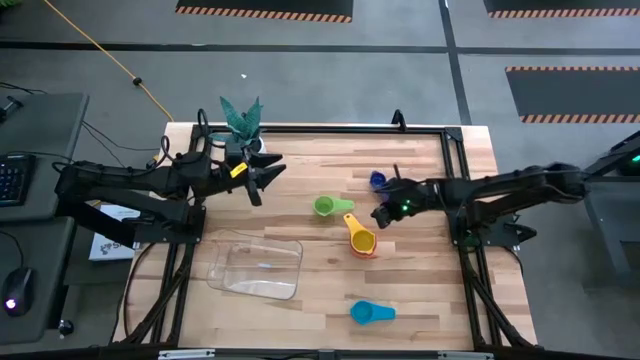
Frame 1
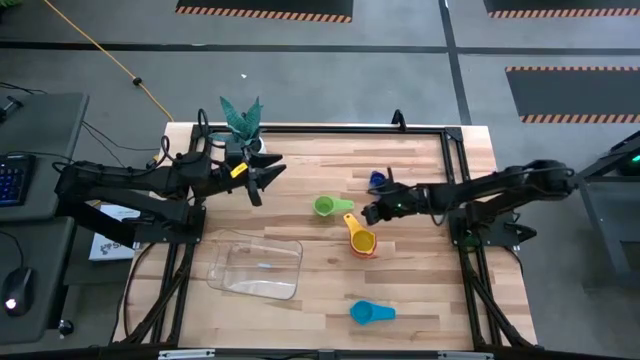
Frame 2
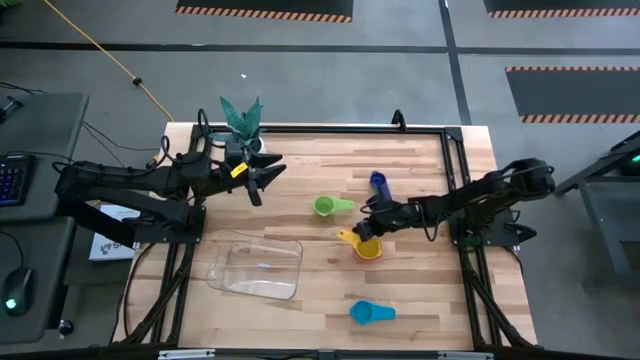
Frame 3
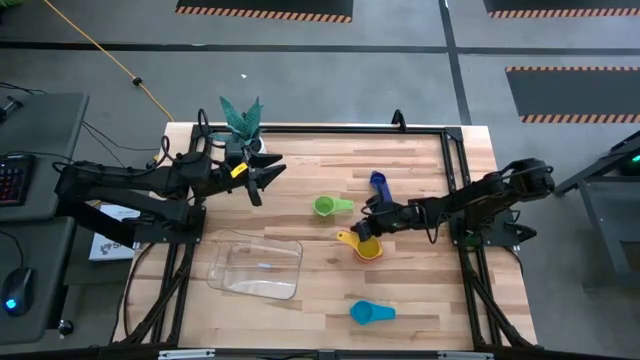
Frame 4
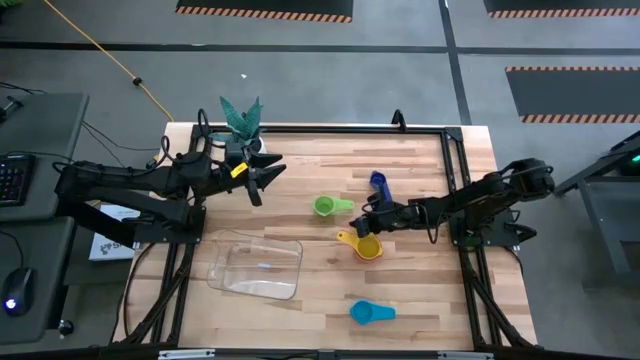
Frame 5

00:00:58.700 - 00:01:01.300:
Task: Nest measuring cups in basket
Adjust the measuring cups

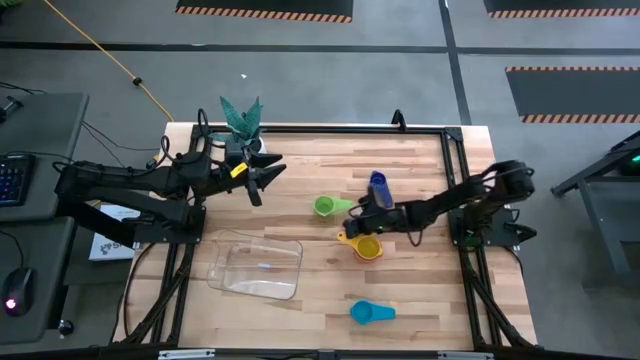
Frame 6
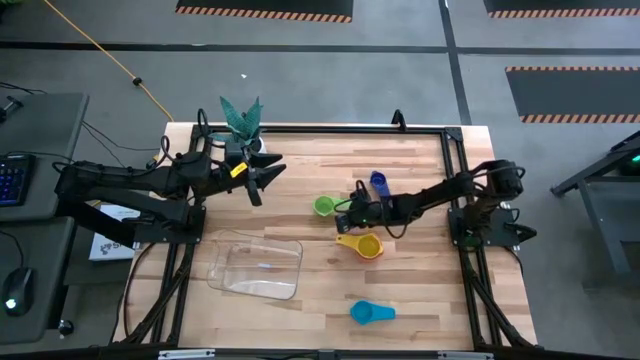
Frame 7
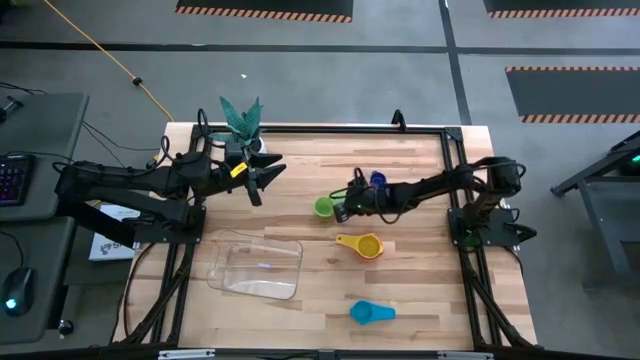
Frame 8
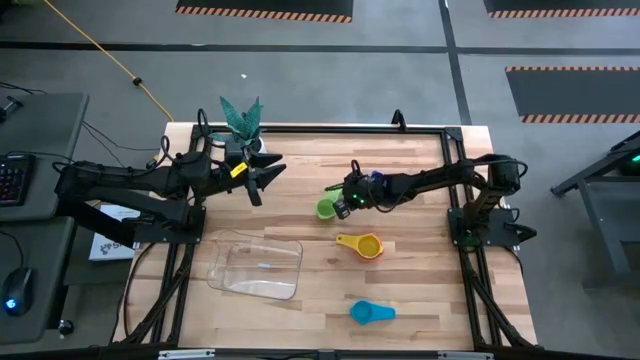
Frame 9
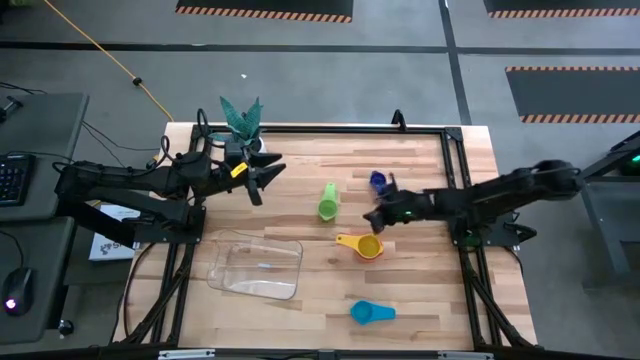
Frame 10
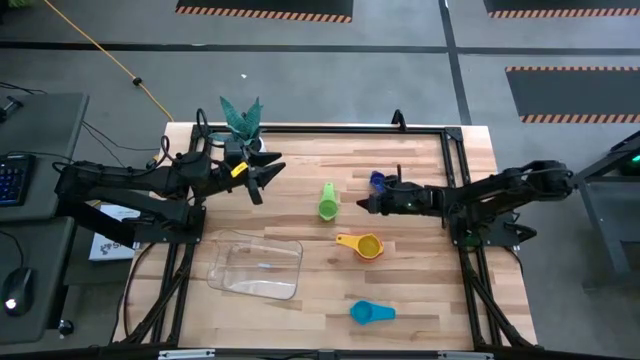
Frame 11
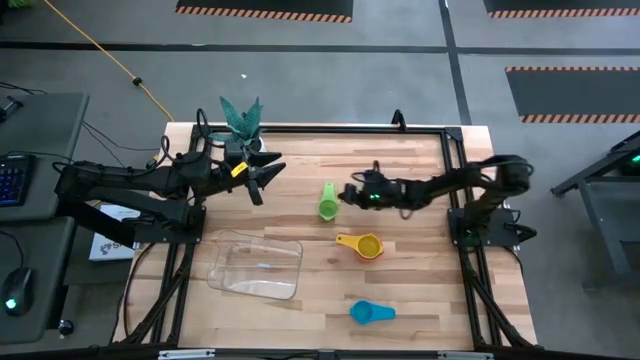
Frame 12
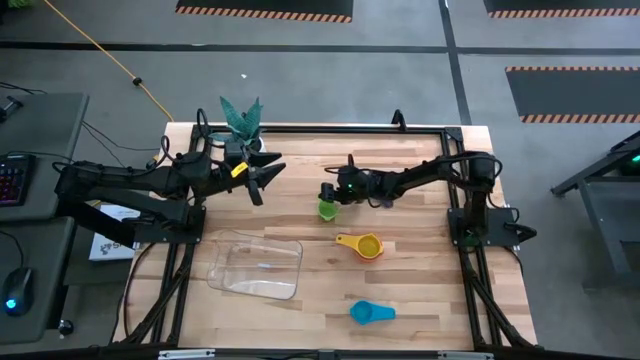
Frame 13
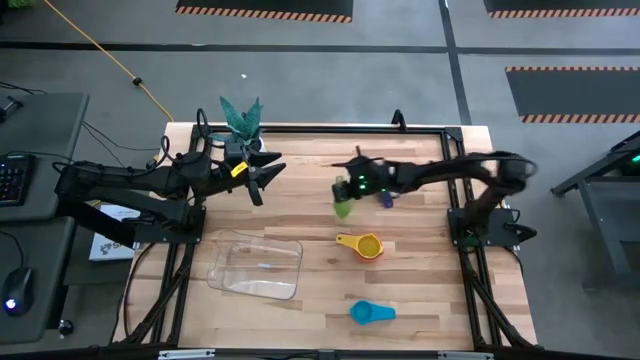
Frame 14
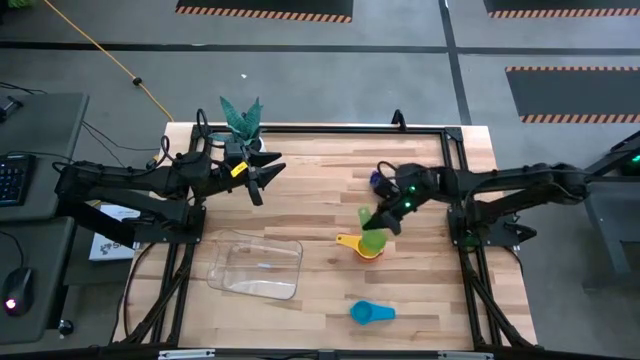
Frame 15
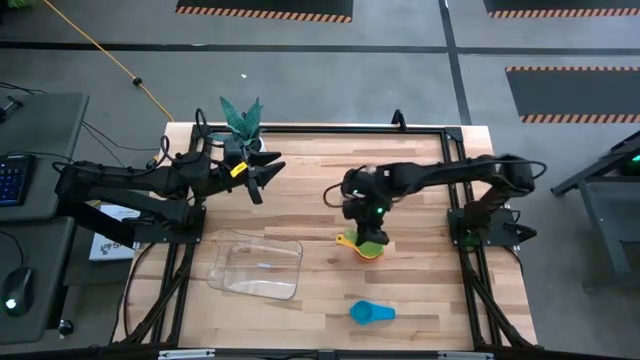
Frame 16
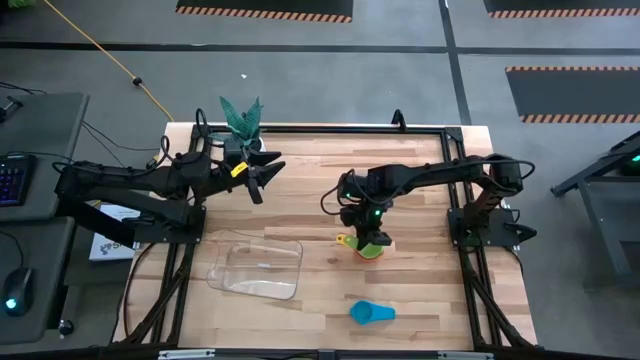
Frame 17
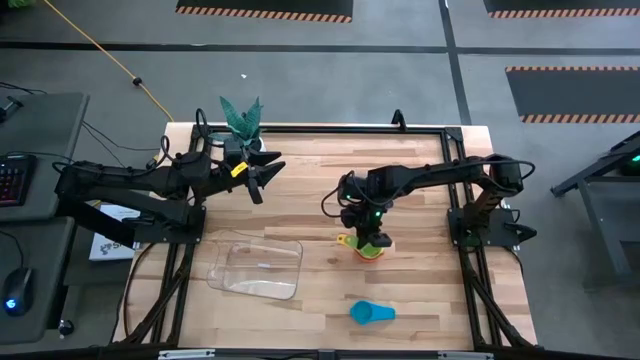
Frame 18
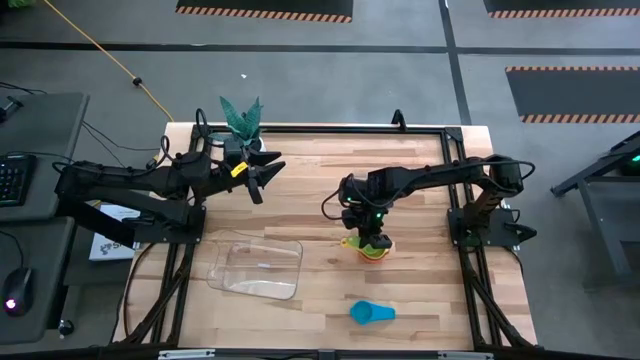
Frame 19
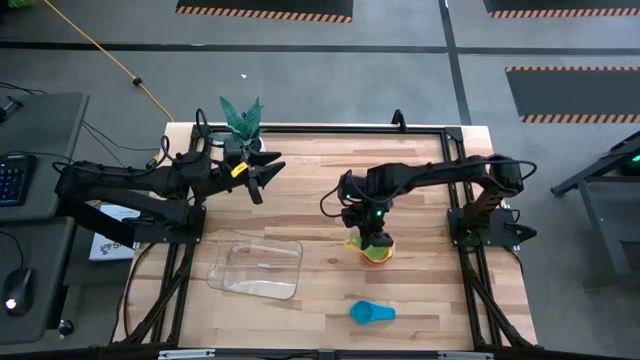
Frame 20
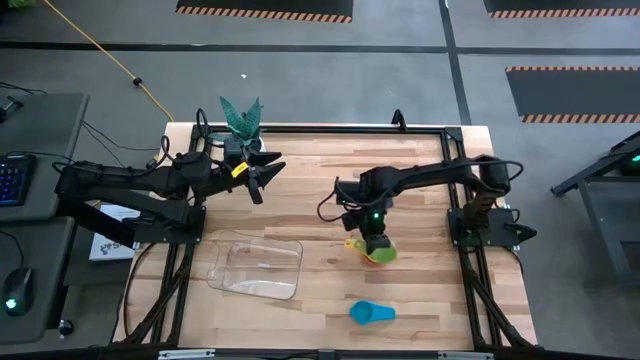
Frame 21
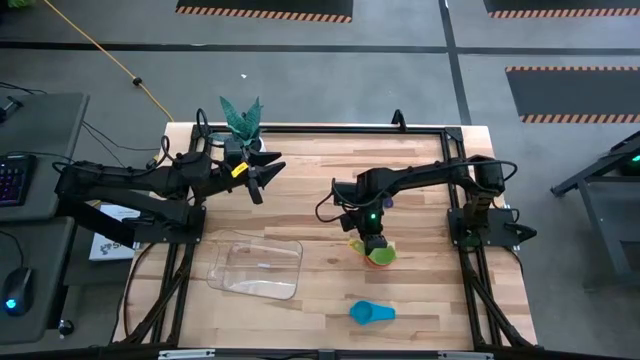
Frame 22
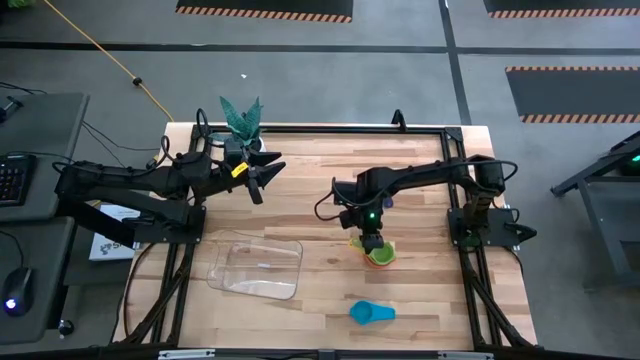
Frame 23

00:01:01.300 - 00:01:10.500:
Stack the green measuring cup on top of the yellow measuring cup

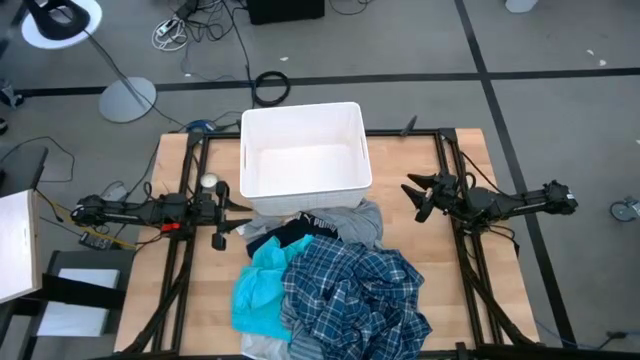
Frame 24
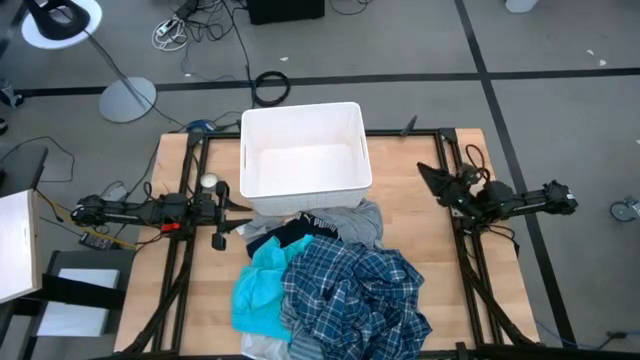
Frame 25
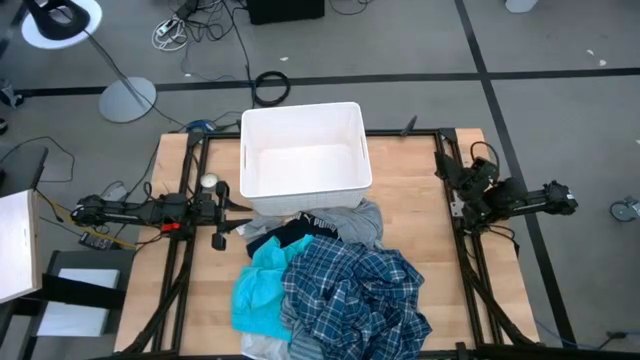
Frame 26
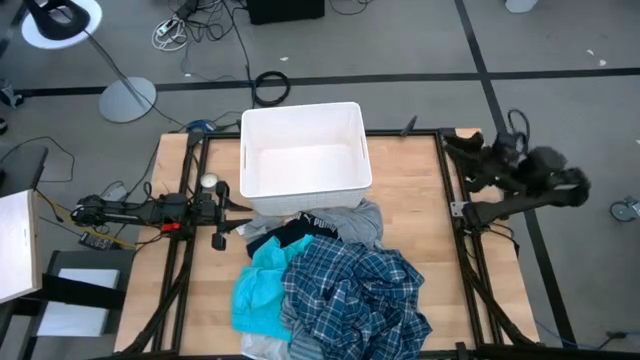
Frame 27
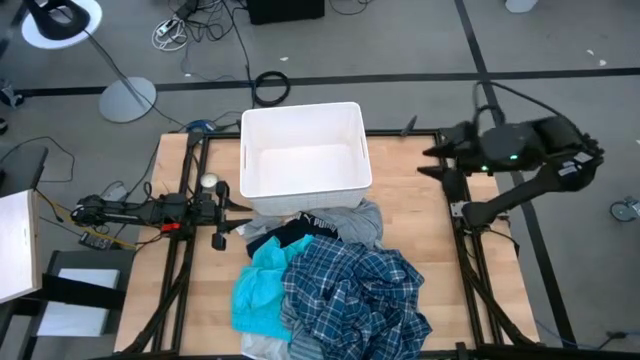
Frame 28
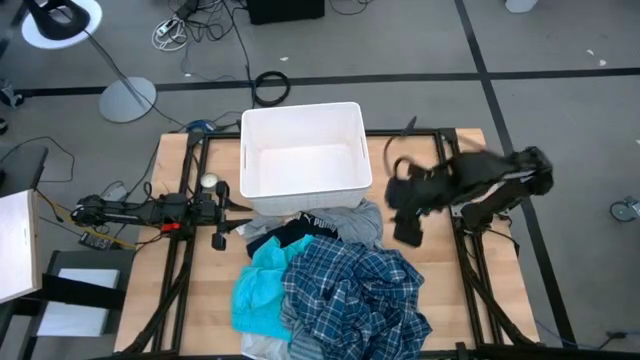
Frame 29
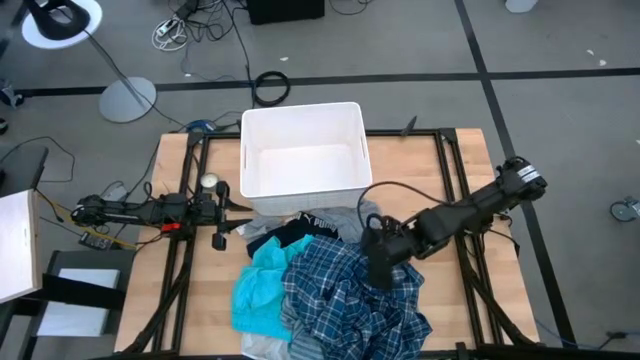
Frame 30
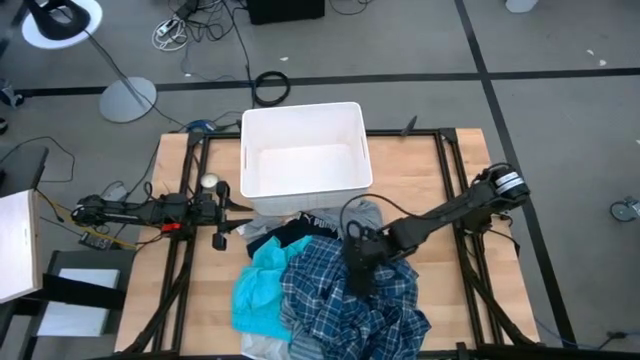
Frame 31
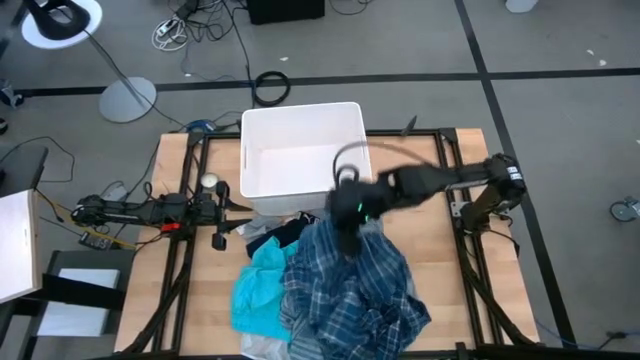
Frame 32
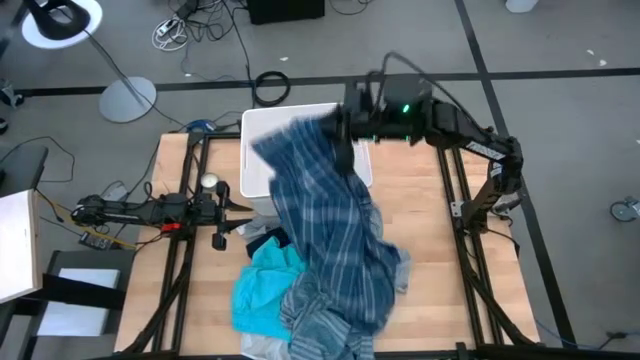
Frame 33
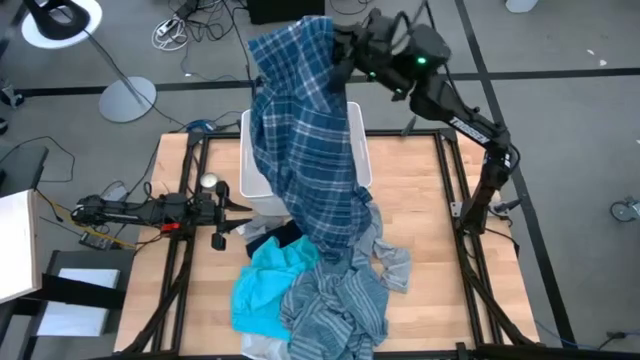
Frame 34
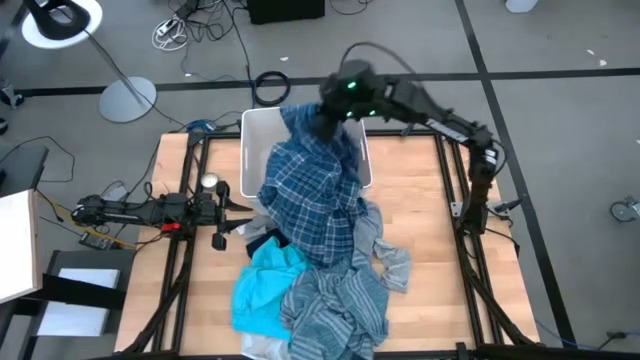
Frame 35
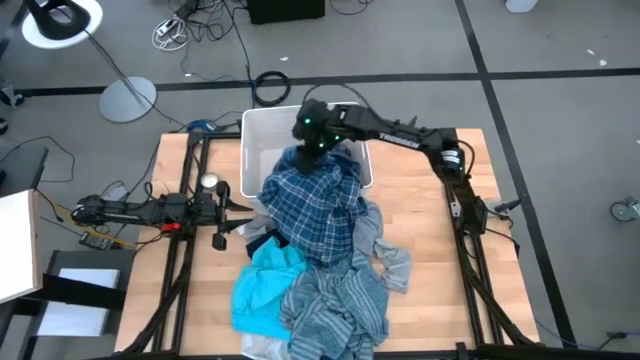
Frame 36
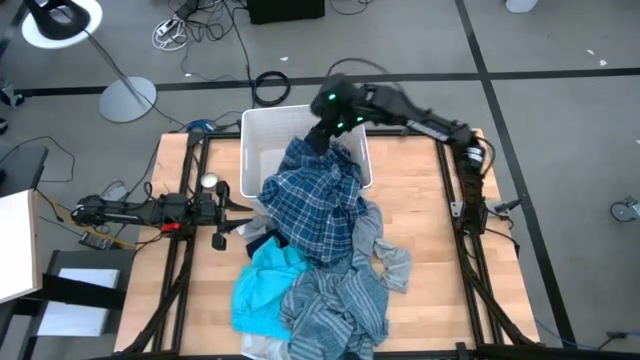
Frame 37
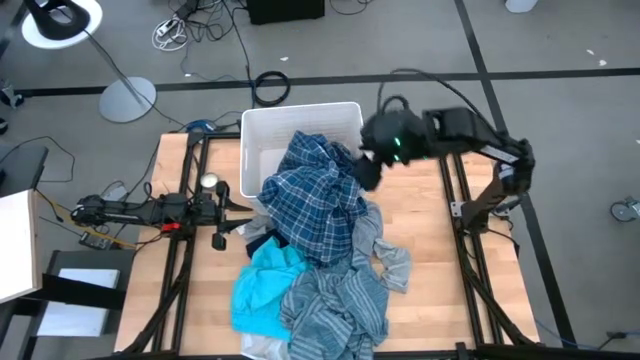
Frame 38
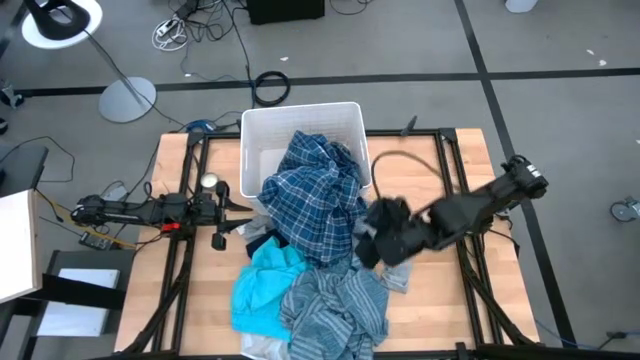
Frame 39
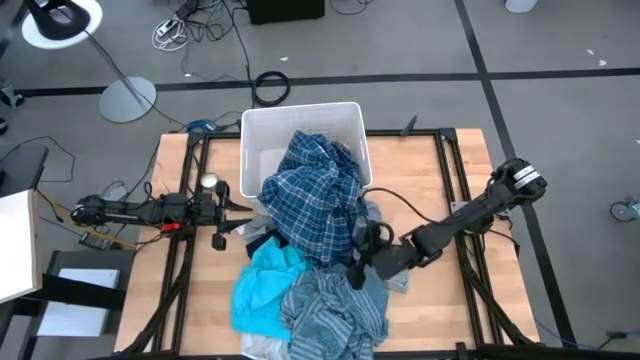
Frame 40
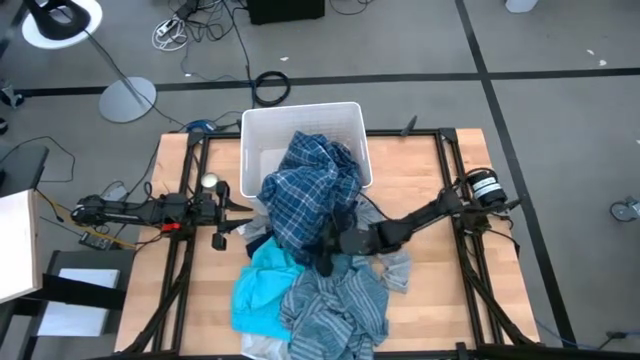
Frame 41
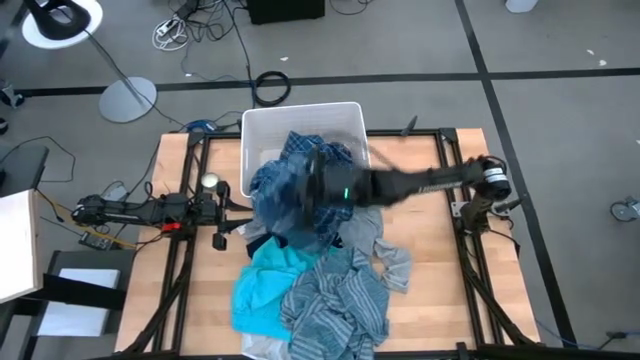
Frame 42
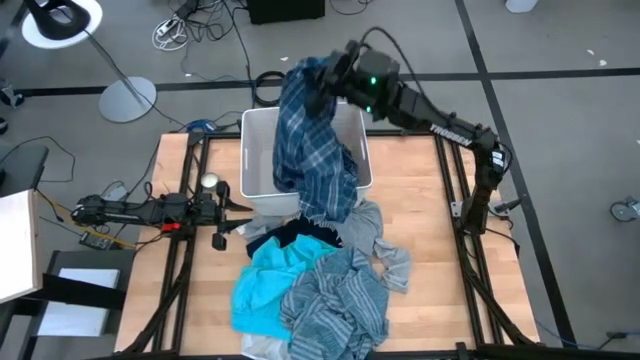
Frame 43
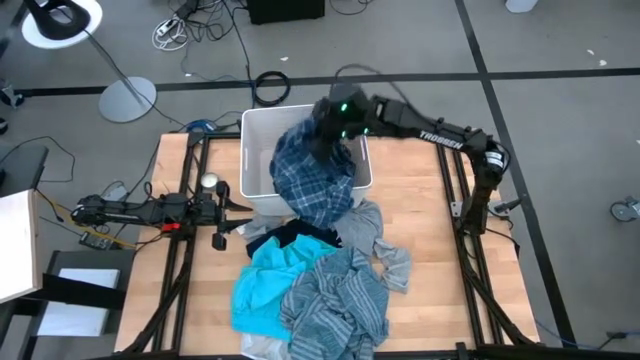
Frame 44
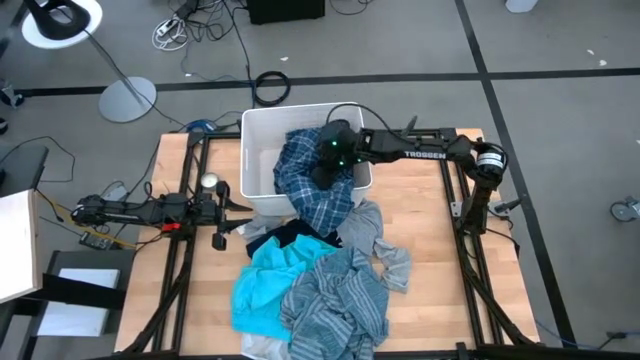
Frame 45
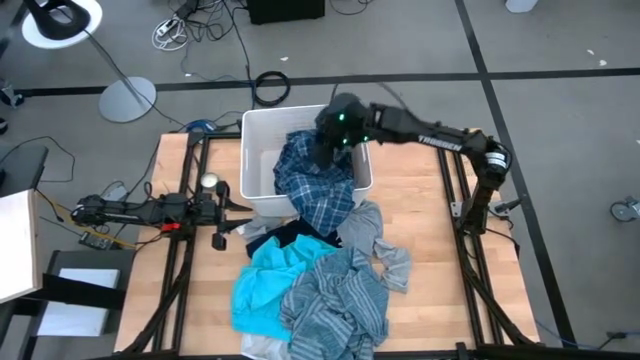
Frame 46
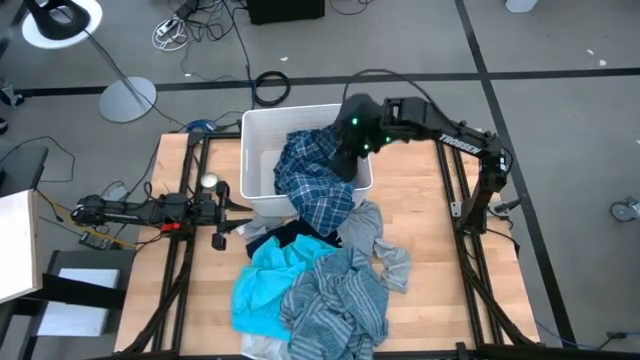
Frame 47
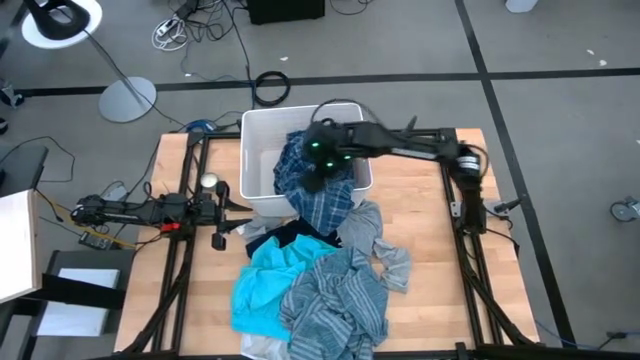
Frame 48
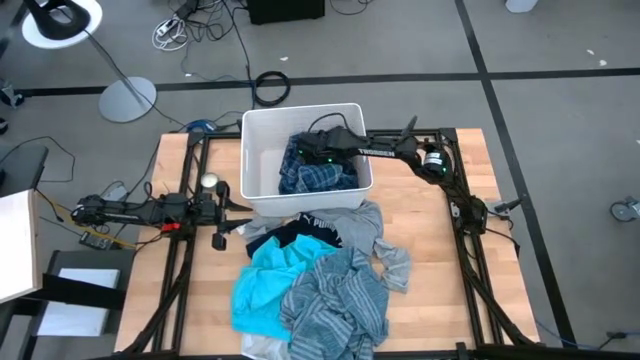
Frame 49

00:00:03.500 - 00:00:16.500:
Task: Sort clothes
Put the blue pattern shirt into the white bin
